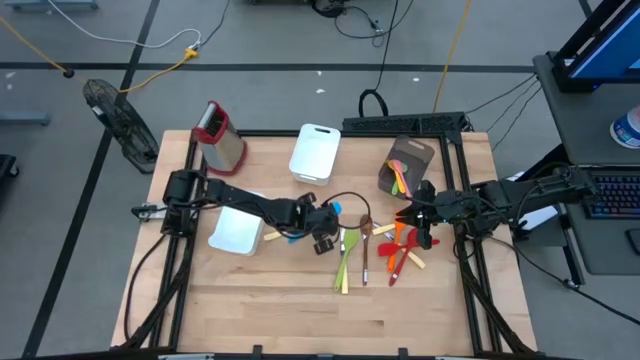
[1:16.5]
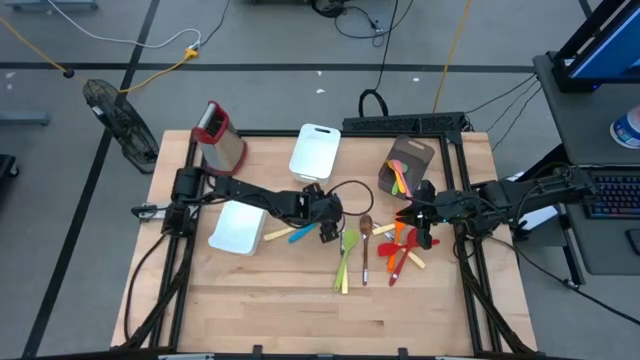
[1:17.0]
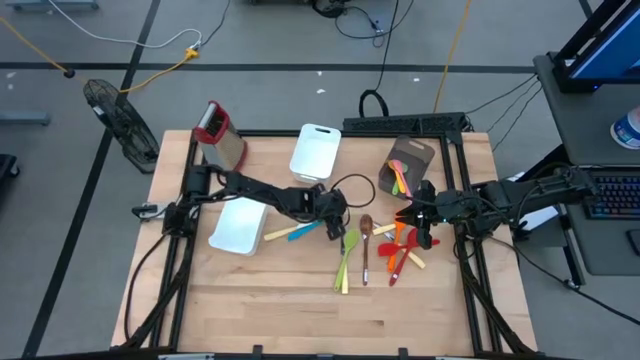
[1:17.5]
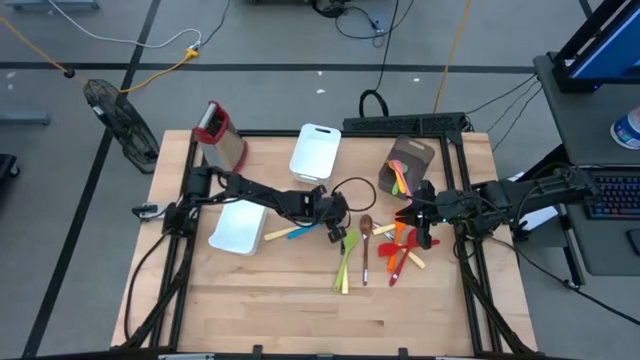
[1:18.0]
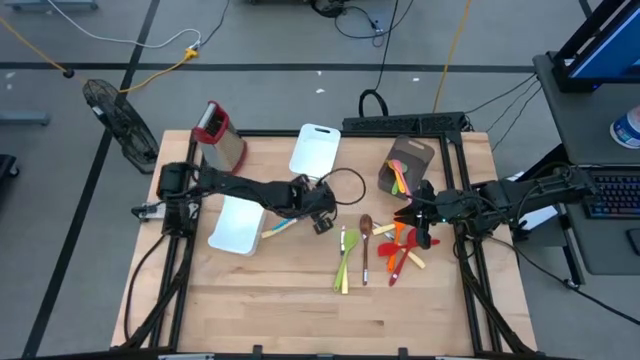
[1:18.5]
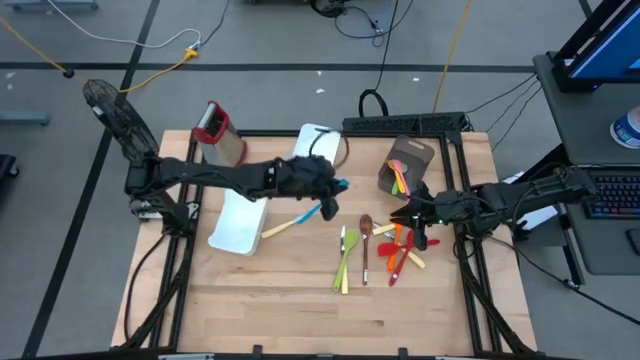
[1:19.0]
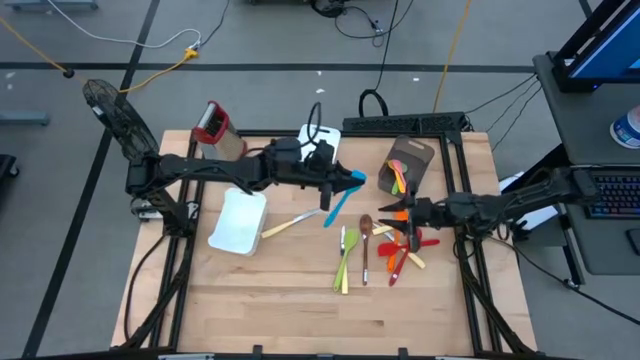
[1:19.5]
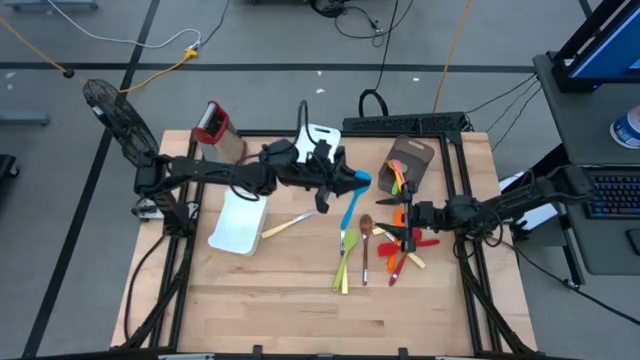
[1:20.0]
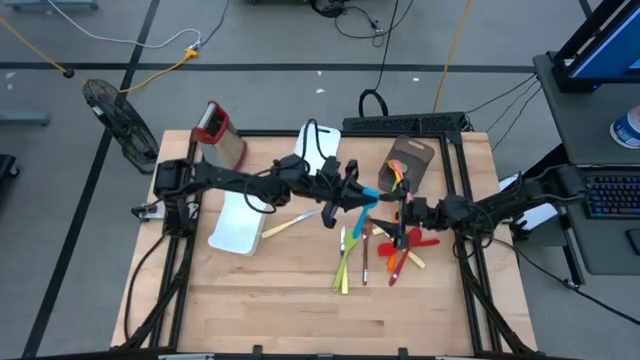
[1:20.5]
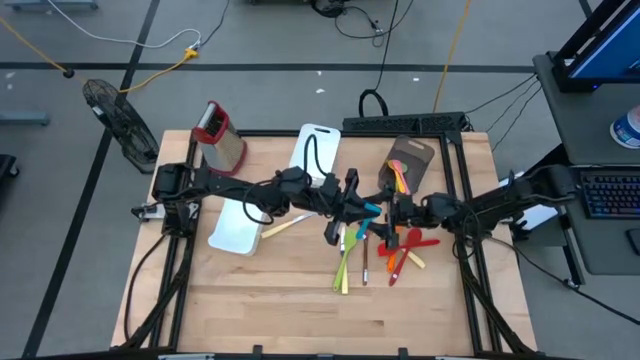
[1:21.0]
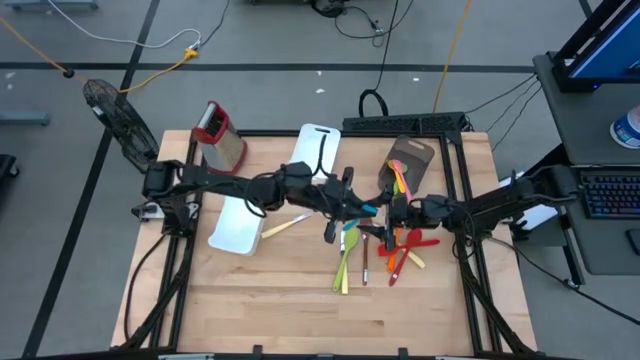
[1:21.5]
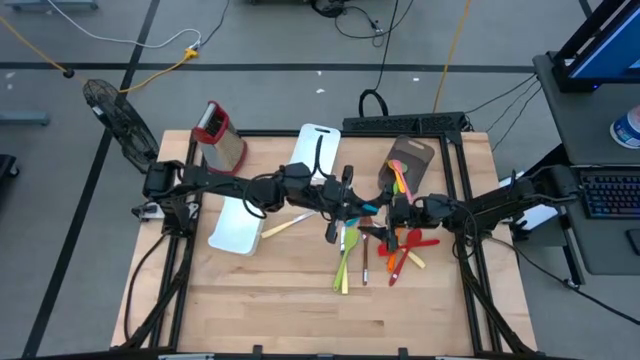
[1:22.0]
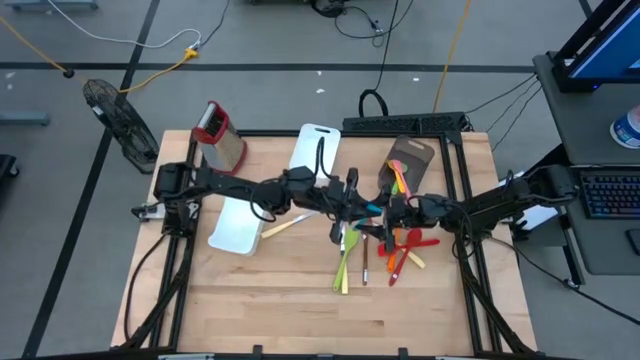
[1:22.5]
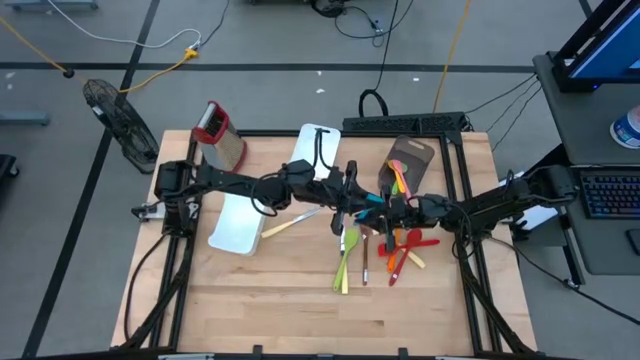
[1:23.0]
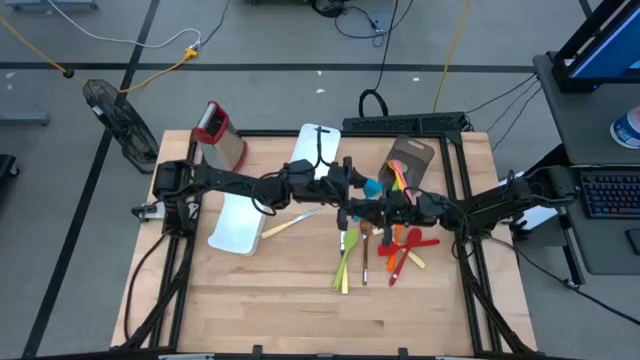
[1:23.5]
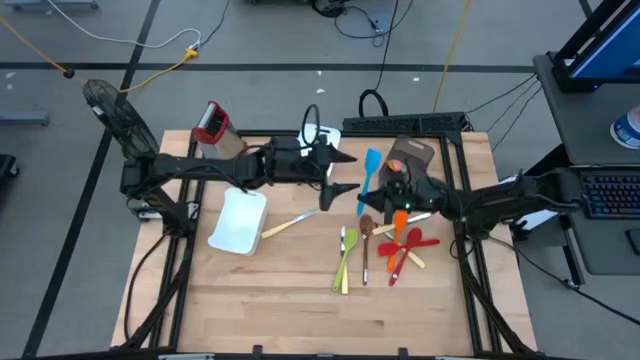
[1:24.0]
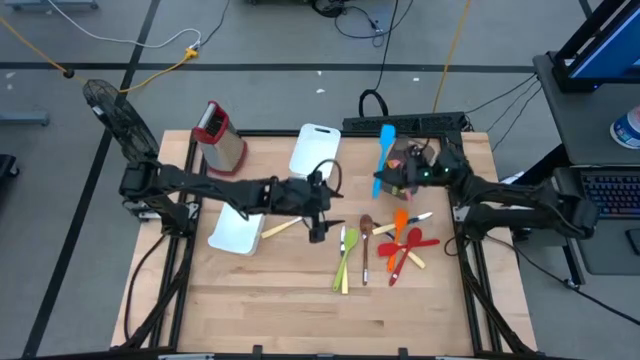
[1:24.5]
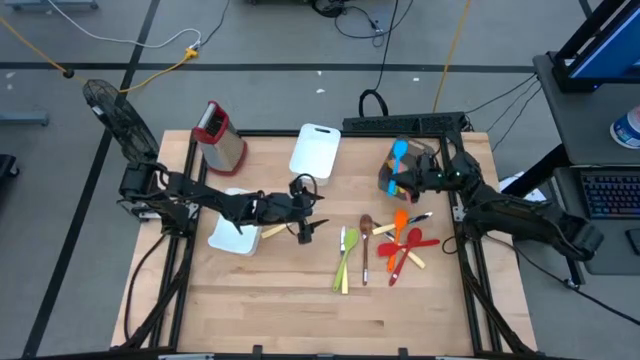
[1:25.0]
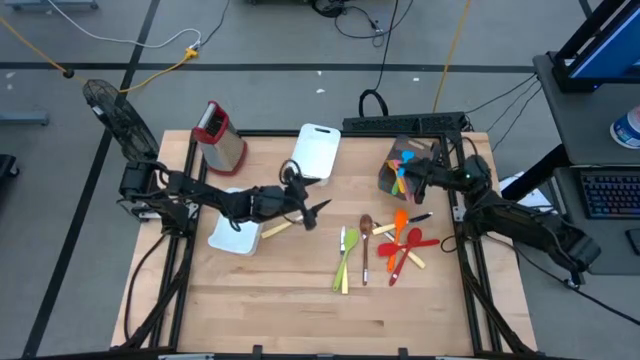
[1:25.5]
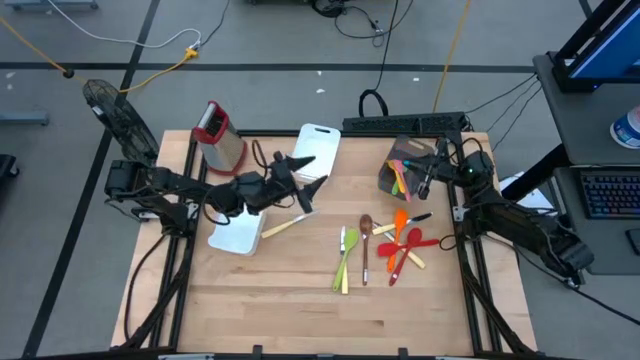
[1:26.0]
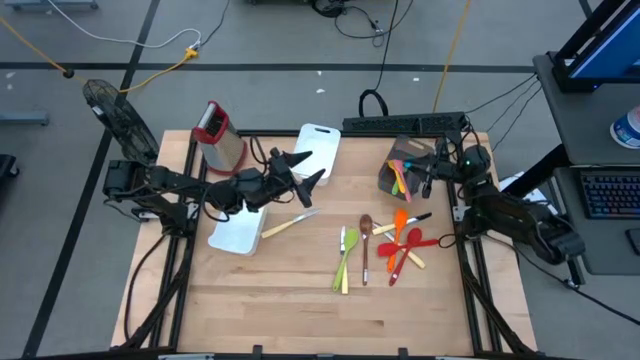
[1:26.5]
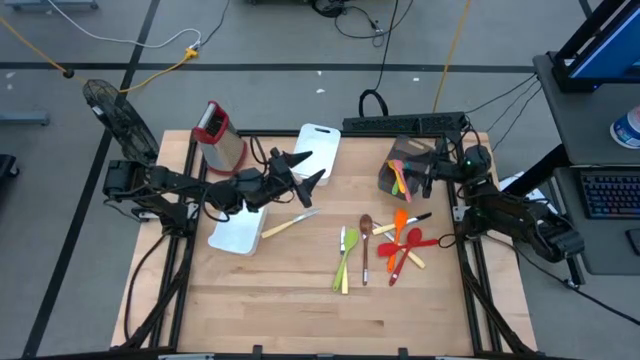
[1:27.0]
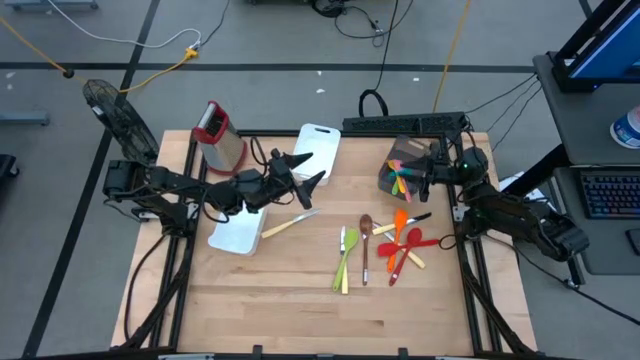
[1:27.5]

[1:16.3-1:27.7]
Task: Pick & Place Kitchen Items
Put the blue spatula into the black bin

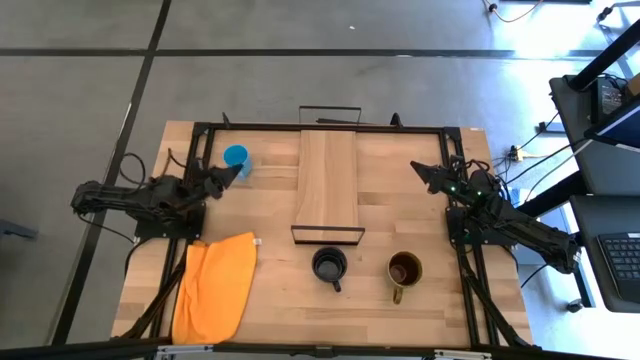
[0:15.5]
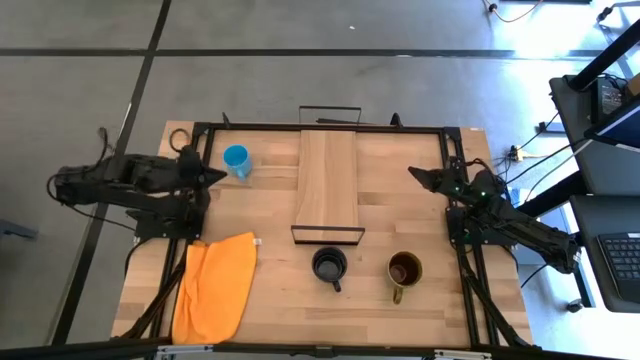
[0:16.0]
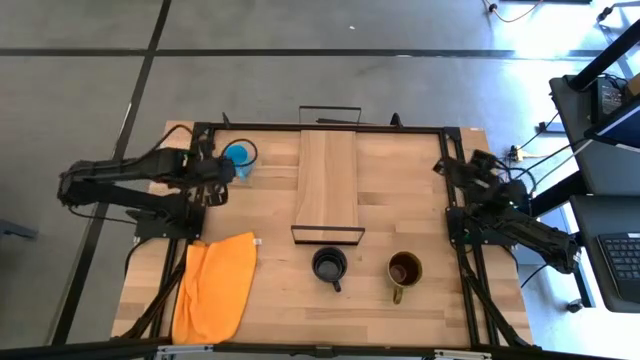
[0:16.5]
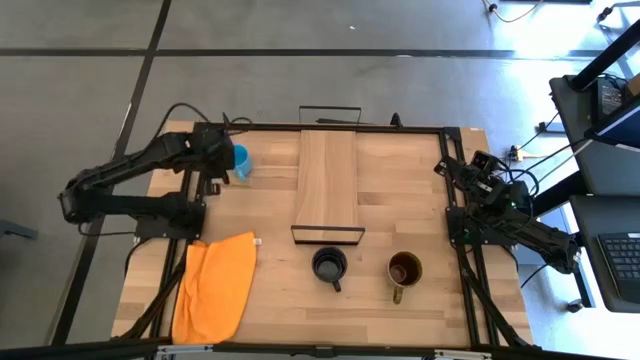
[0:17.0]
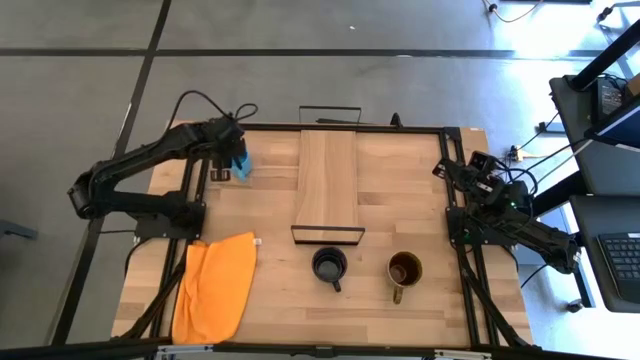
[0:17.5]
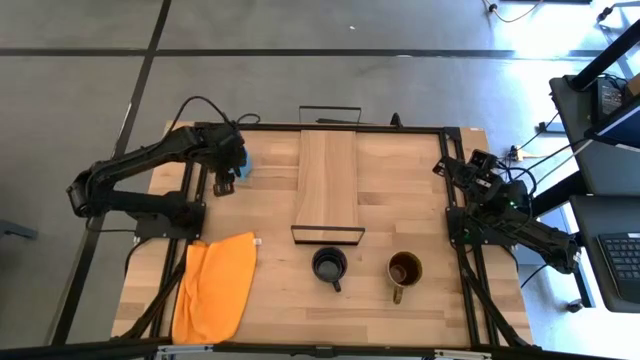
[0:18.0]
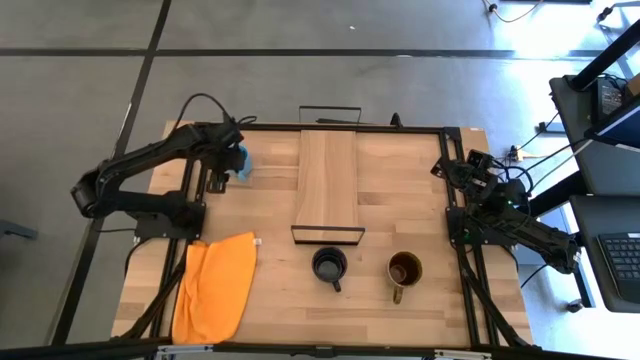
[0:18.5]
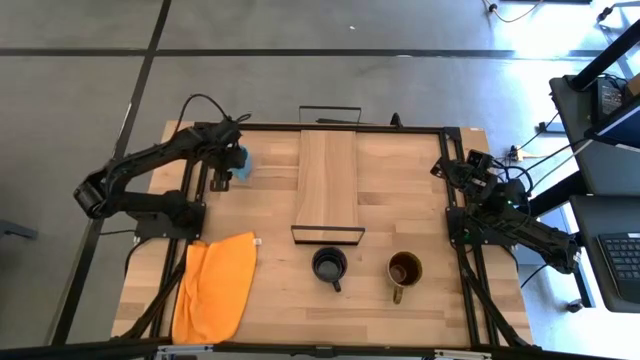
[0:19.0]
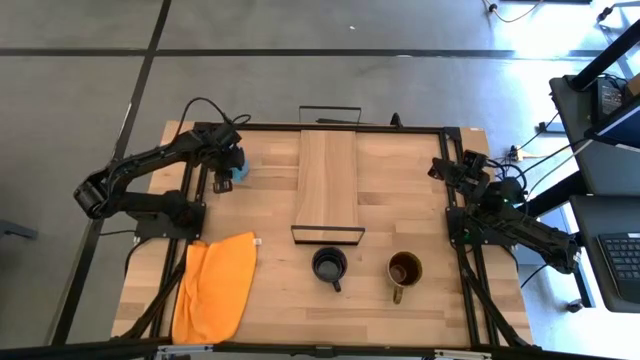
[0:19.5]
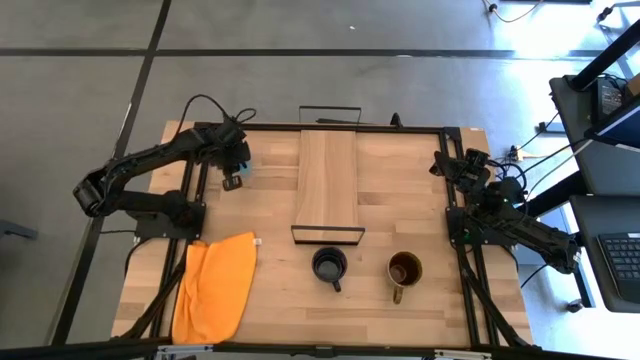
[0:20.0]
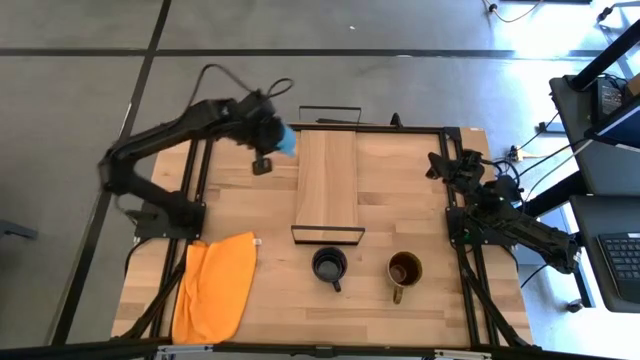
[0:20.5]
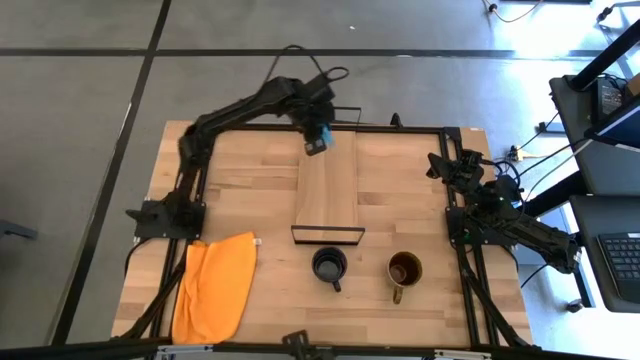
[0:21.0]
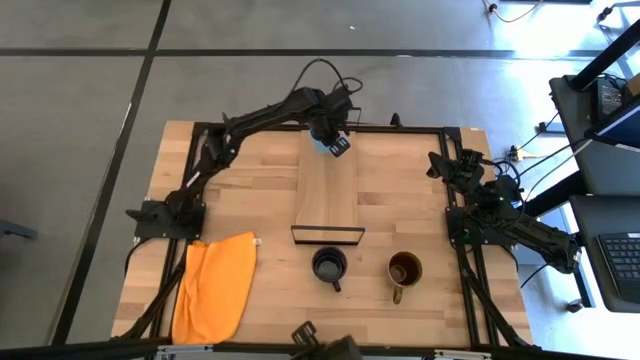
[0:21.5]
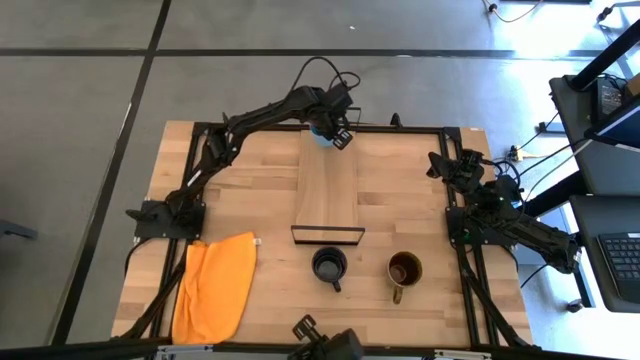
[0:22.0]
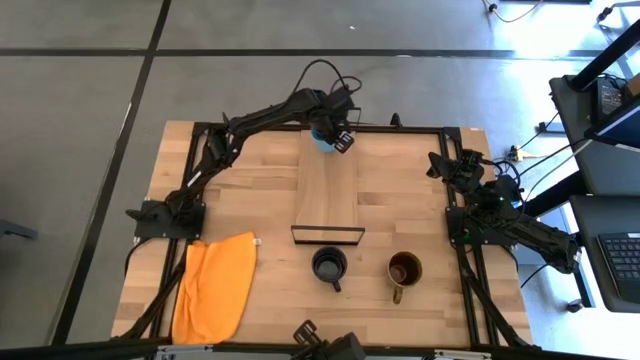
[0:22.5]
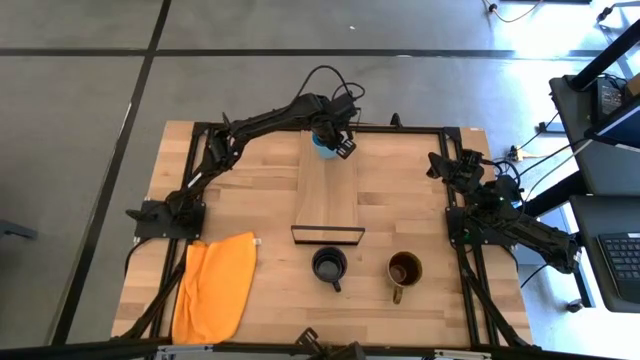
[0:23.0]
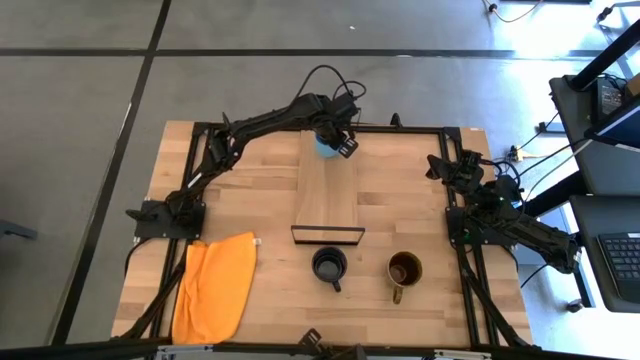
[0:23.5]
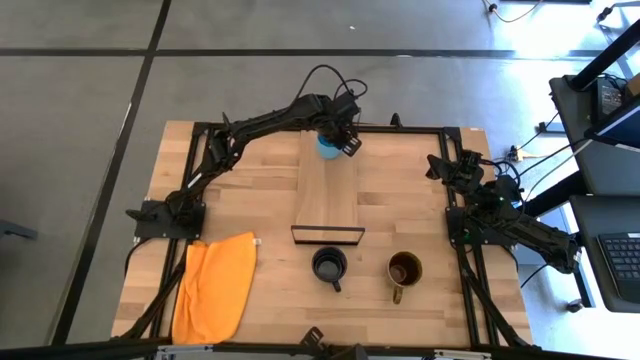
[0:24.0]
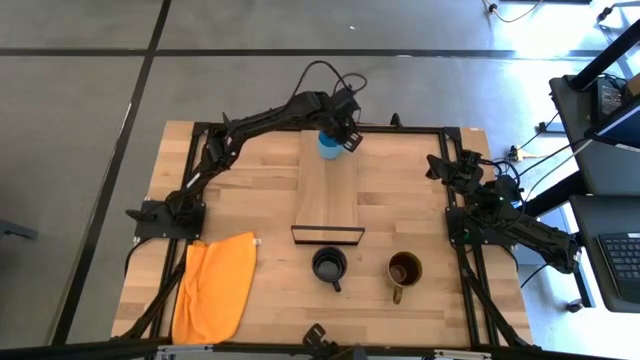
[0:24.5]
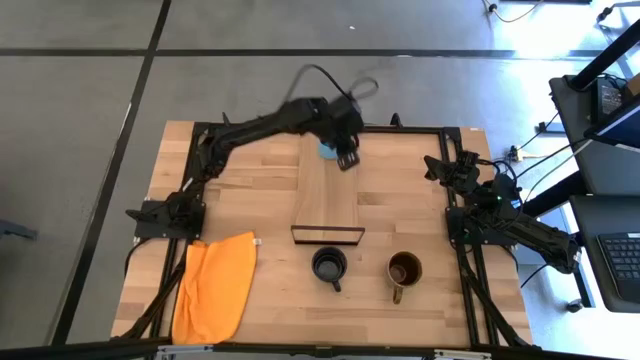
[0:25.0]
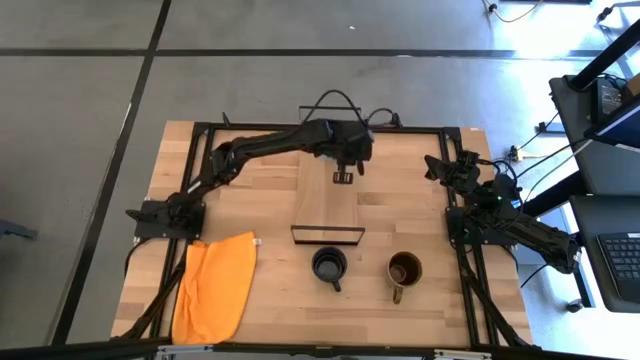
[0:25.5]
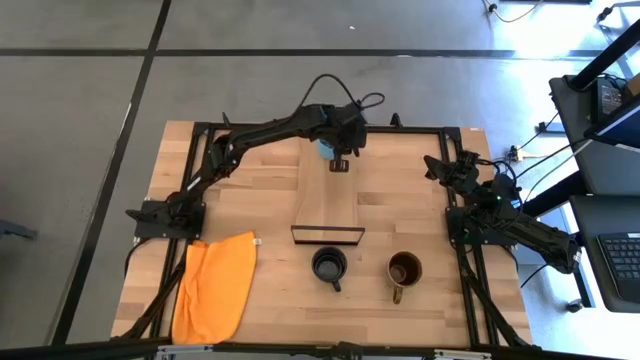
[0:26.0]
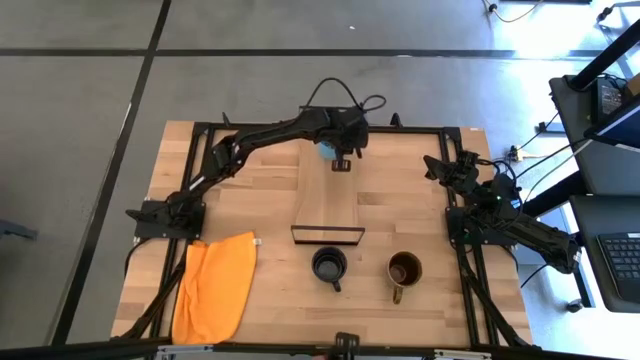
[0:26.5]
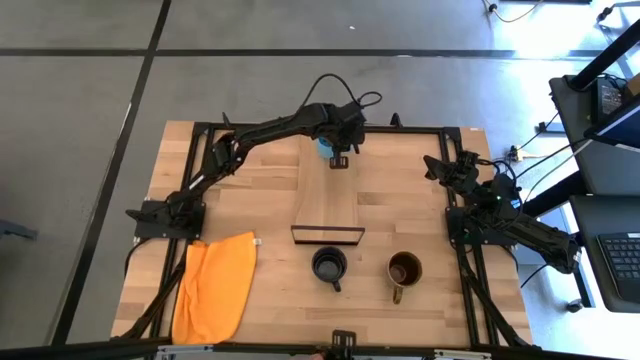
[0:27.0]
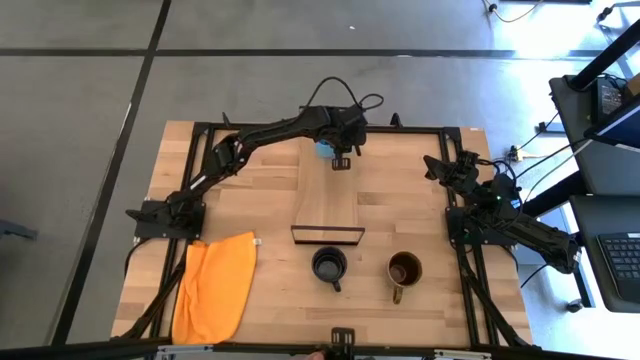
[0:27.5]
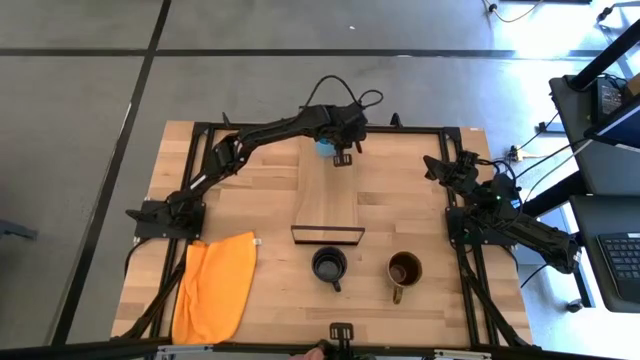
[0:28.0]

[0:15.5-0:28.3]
Task: Stack small to large cups/mugs on shelf
Put the blue mug on the shelf
